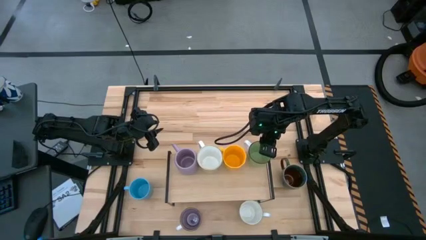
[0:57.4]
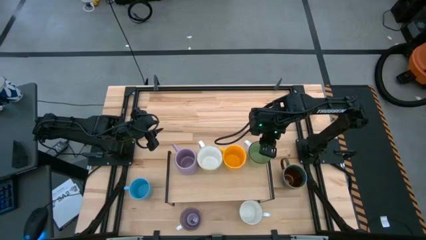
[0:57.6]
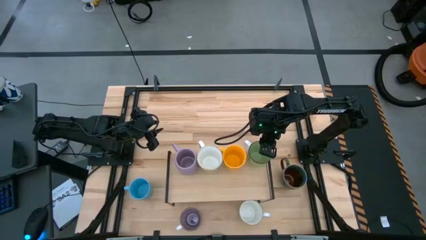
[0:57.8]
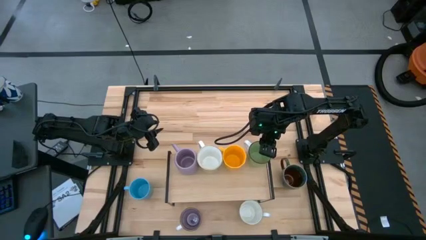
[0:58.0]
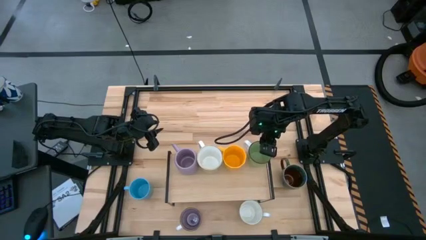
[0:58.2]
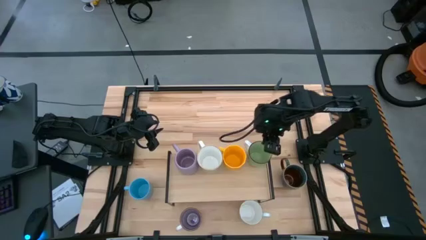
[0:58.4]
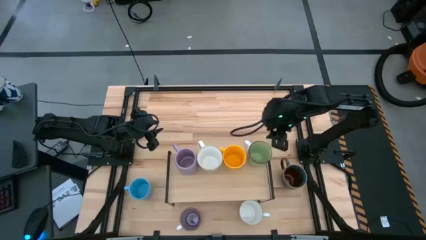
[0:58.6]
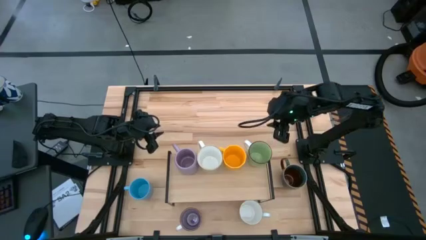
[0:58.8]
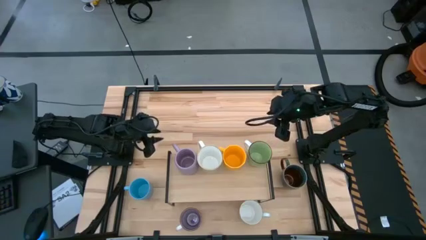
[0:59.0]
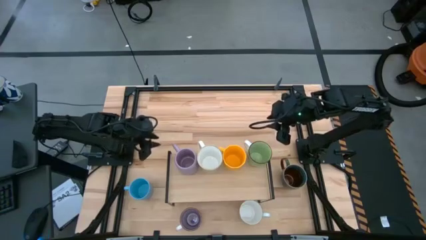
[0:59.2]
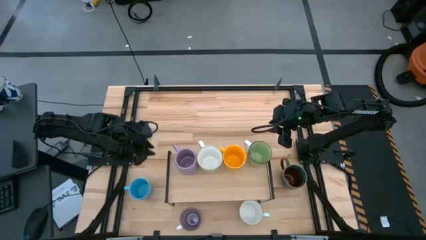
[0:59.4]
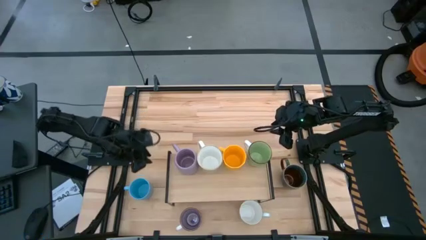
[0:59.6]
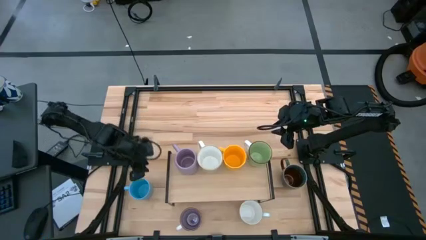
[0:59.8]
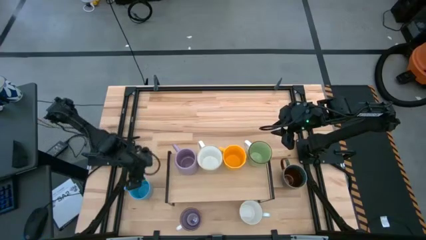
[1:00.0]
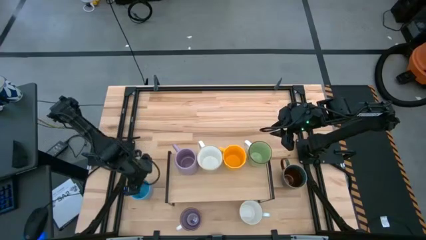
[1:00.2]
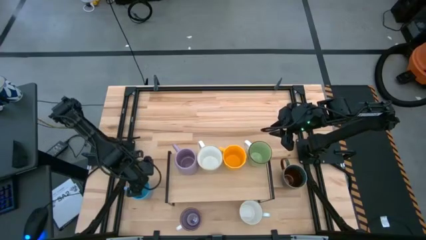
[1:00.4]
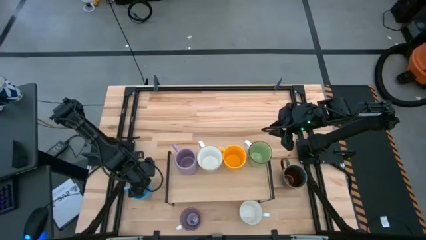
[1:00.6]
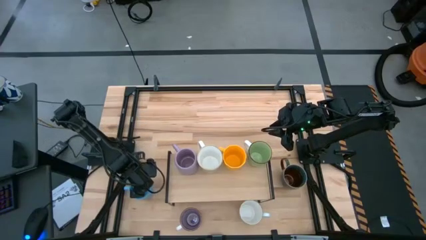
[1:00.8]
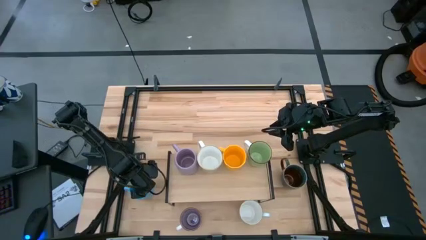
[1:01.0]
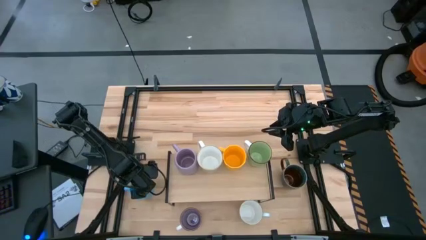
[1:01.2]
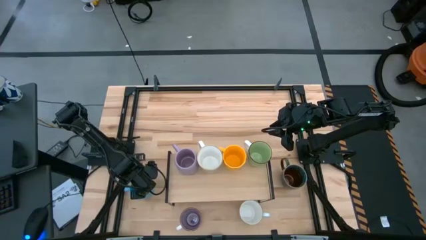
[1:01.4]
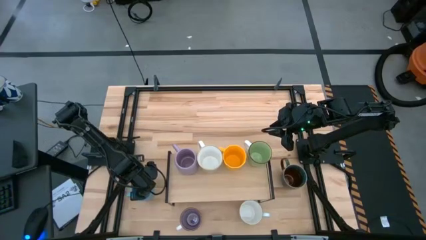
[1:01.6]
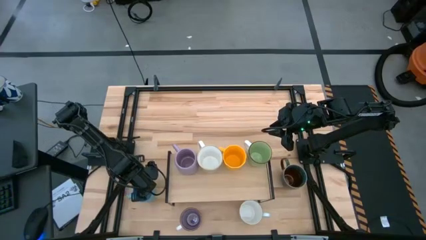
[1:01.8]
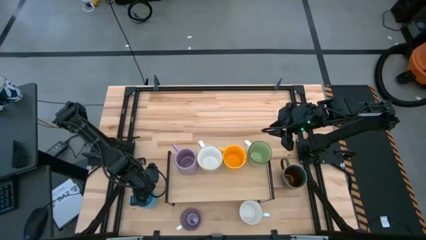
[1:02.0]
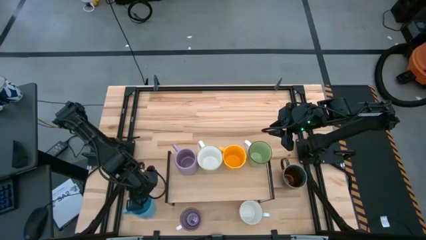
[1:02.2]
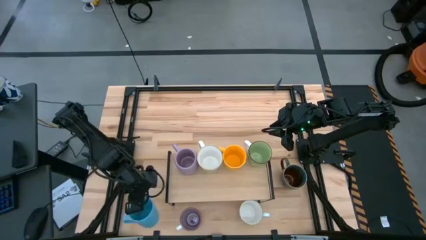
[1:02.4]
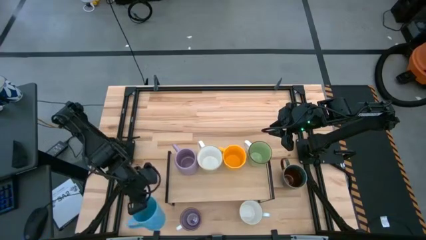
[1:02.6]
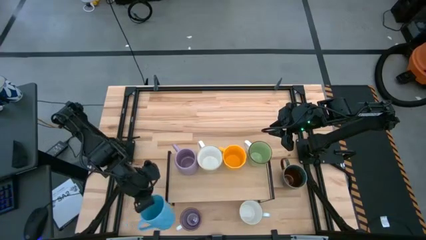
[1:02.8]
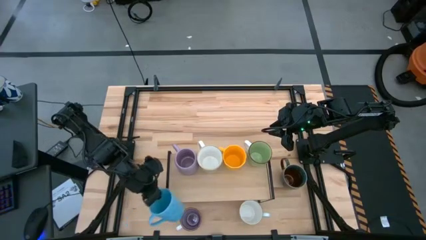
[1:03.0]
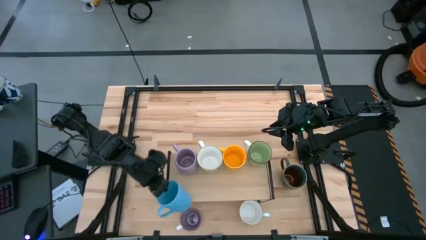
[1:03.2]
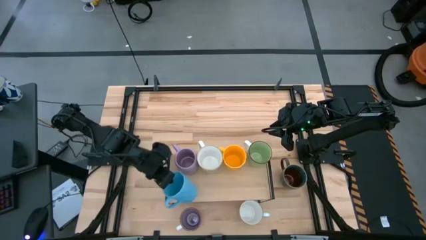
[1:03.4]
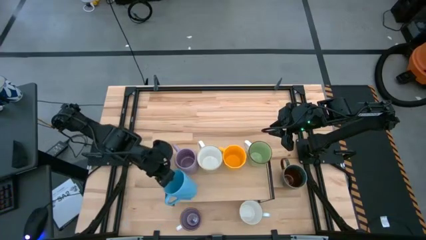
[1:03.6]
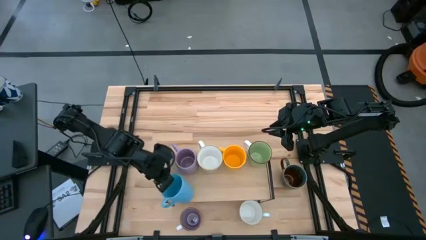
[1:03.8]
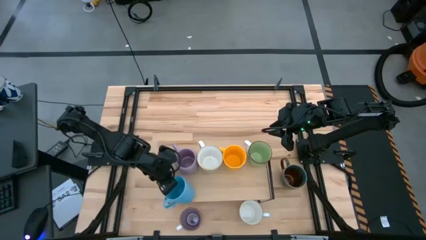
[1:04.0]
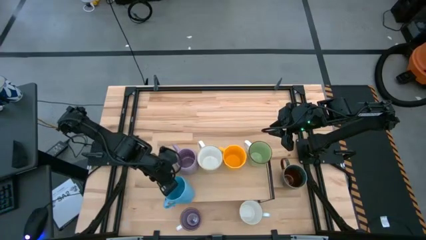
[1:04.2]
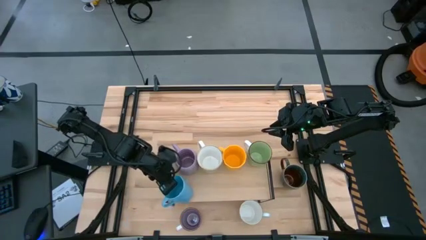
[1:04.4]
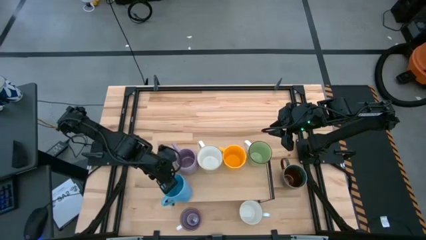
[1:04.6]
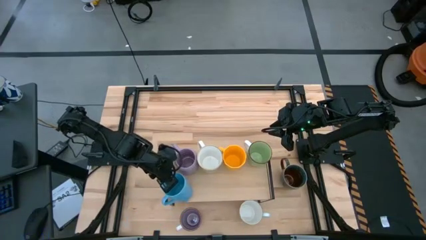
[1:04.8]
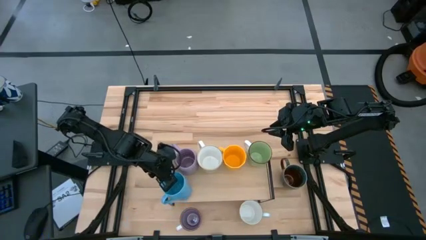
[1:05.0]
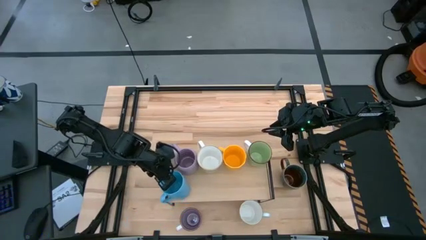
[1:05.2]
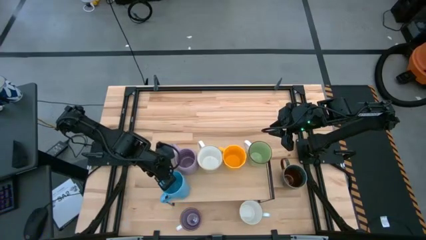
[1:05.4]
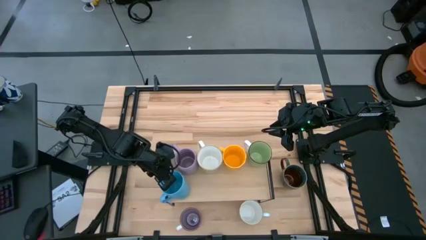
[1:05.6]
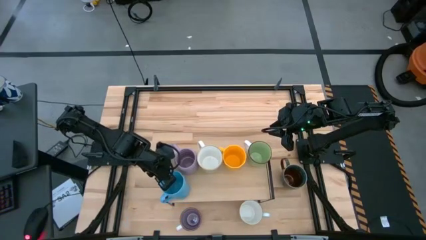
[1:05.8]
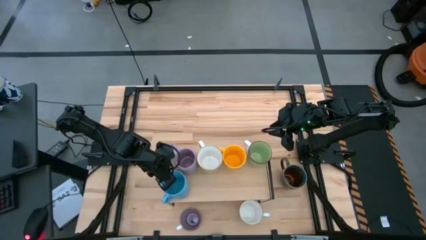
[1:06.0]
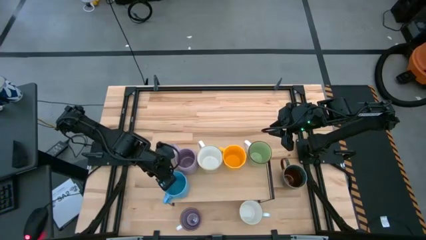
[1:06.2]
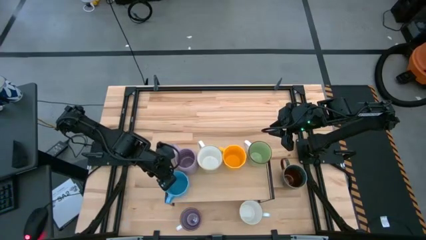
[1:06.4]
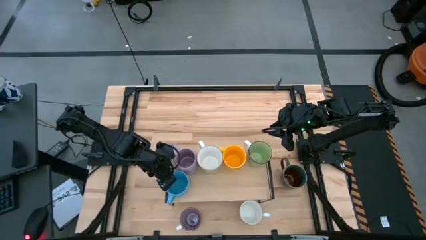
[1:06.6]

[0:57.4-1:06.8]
Task: Place coffee mugs
Put the blue mug on the shelf

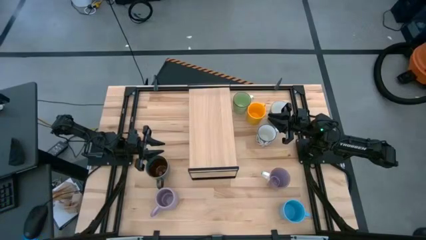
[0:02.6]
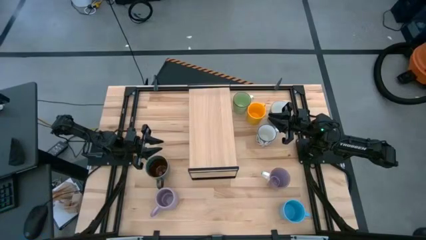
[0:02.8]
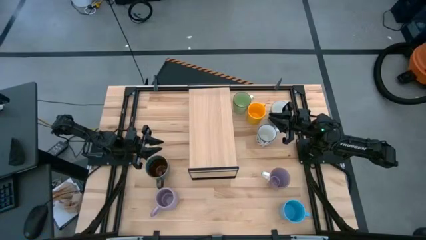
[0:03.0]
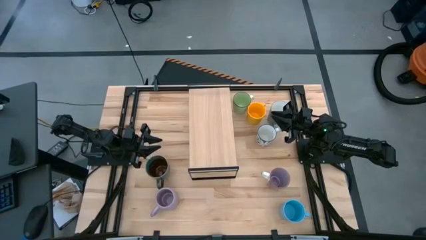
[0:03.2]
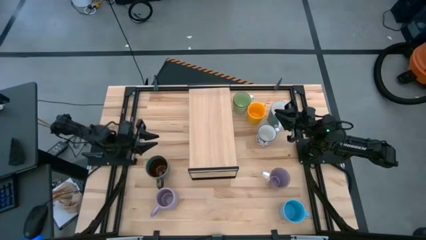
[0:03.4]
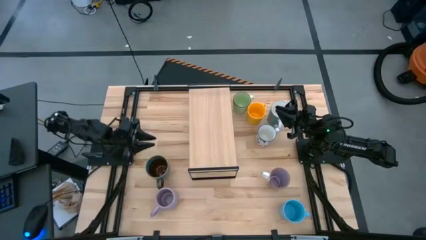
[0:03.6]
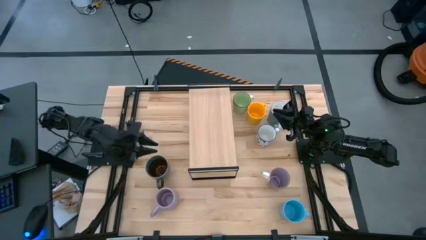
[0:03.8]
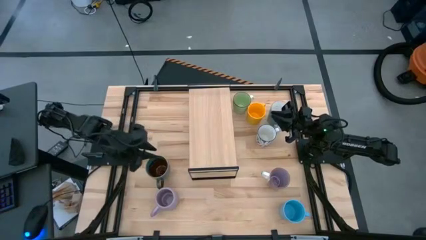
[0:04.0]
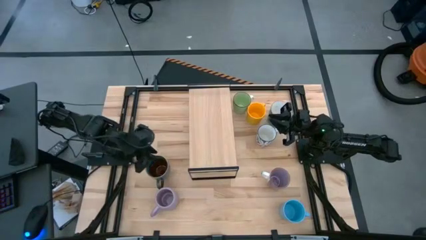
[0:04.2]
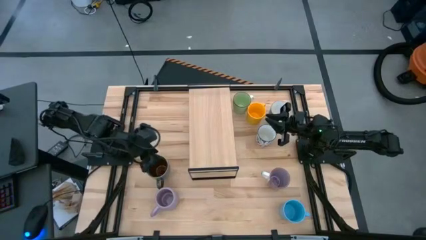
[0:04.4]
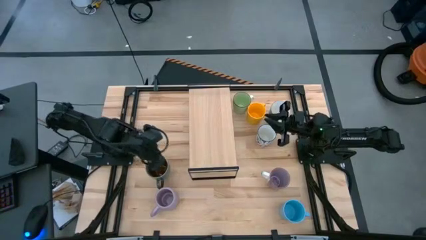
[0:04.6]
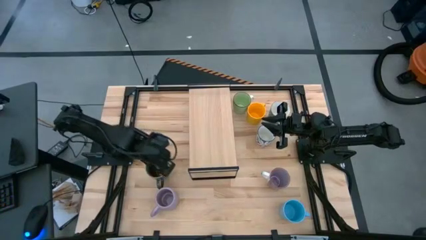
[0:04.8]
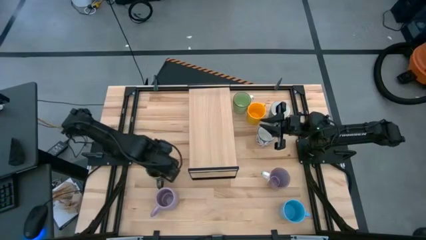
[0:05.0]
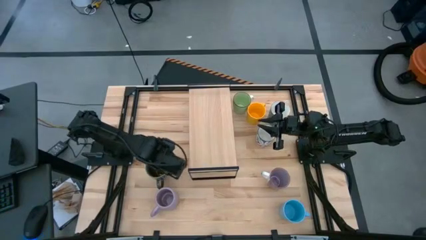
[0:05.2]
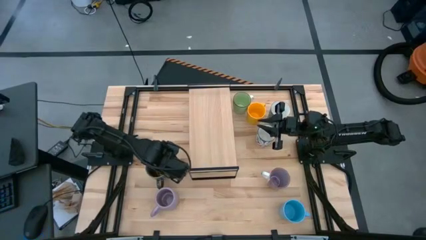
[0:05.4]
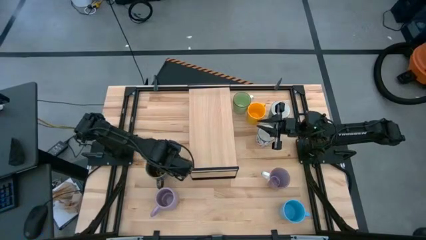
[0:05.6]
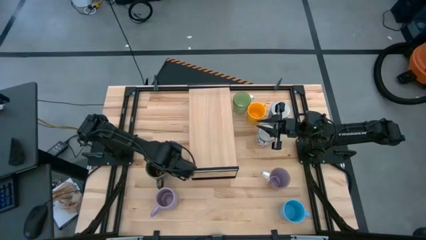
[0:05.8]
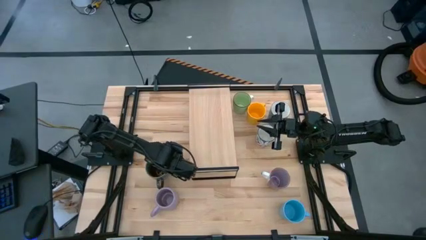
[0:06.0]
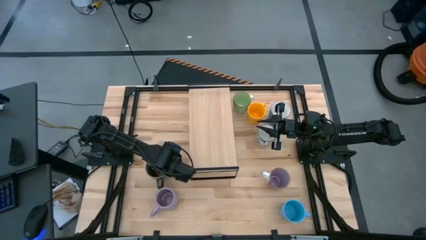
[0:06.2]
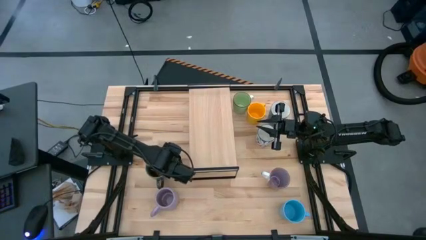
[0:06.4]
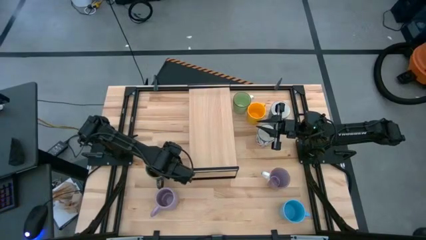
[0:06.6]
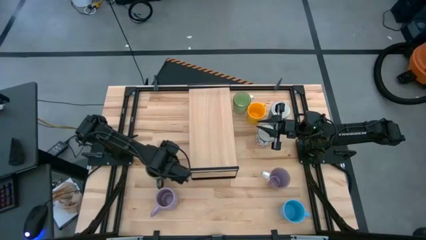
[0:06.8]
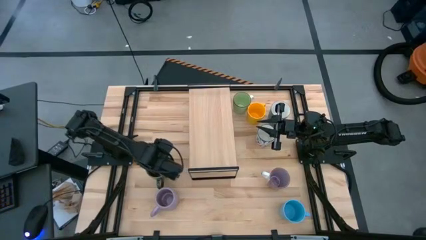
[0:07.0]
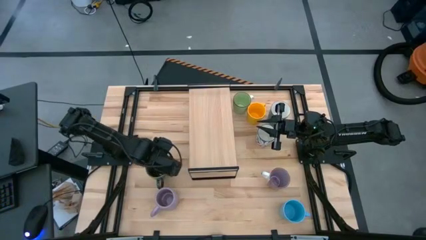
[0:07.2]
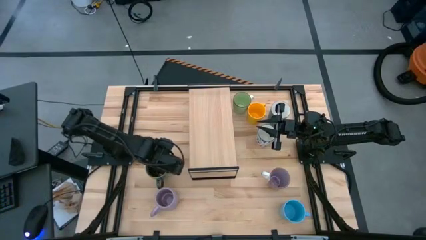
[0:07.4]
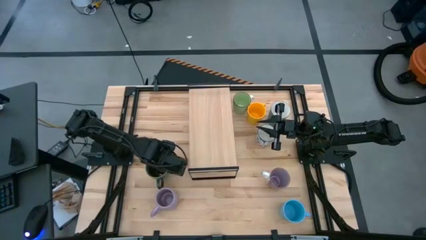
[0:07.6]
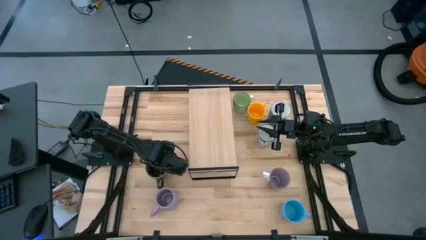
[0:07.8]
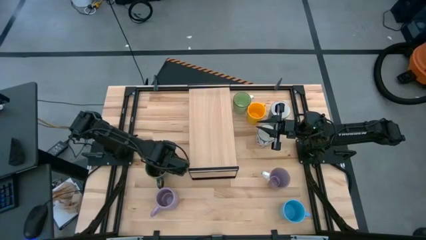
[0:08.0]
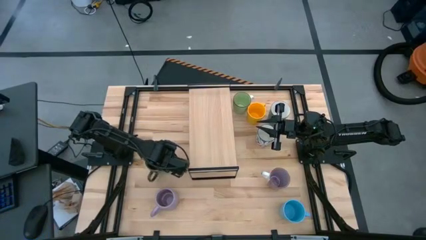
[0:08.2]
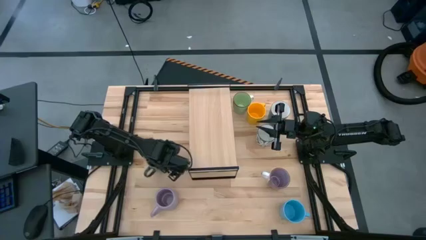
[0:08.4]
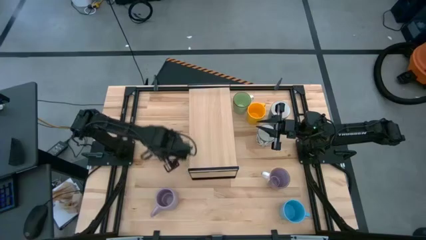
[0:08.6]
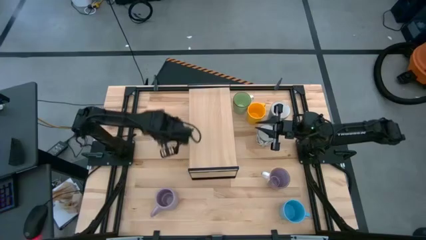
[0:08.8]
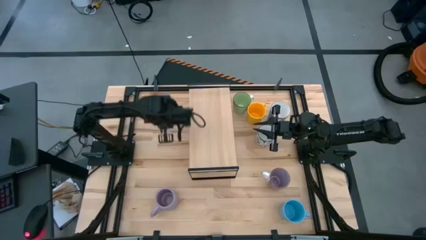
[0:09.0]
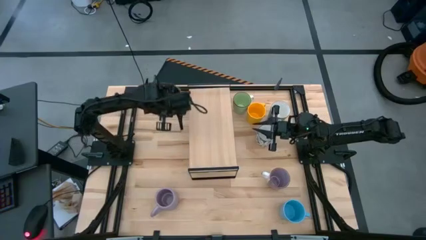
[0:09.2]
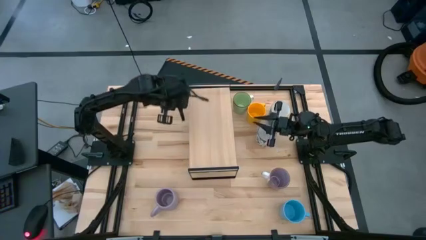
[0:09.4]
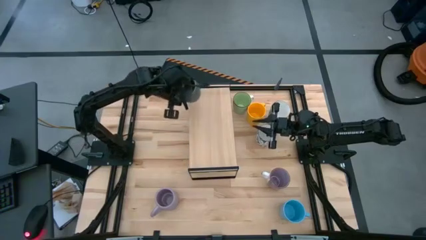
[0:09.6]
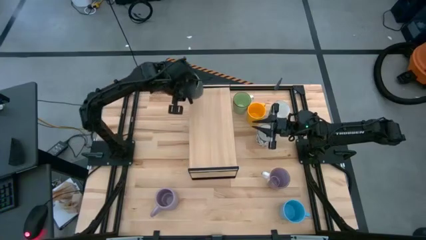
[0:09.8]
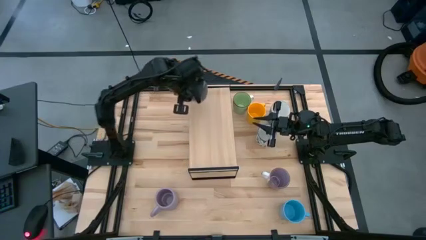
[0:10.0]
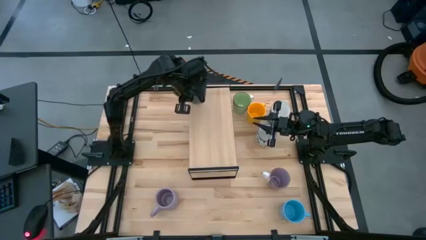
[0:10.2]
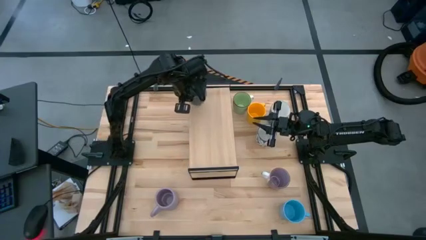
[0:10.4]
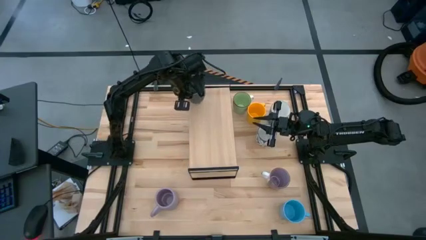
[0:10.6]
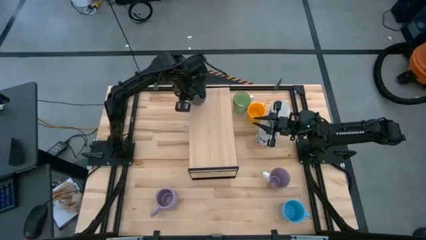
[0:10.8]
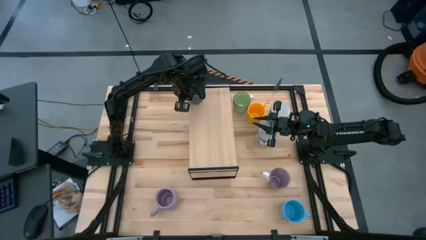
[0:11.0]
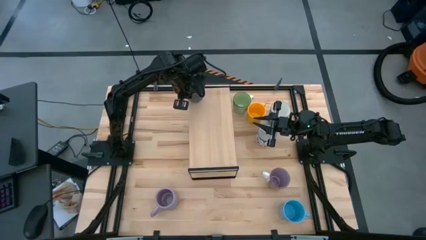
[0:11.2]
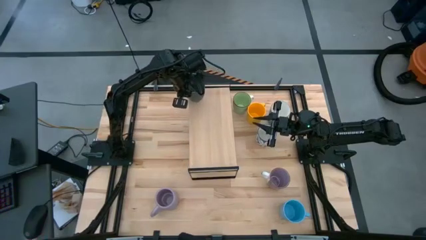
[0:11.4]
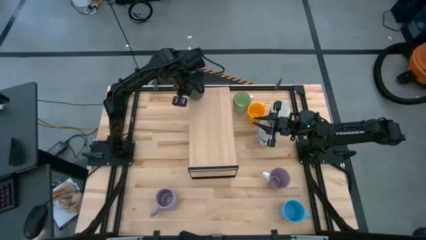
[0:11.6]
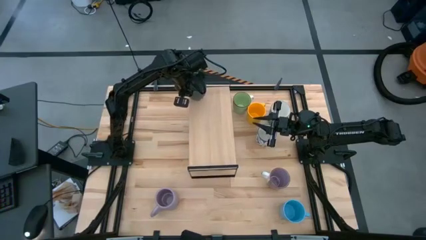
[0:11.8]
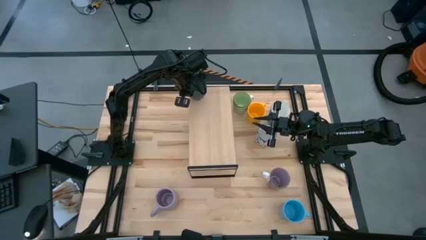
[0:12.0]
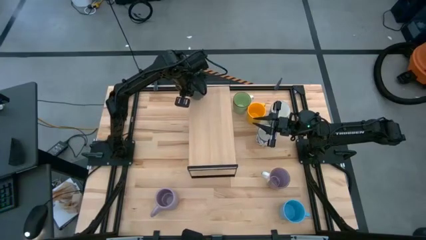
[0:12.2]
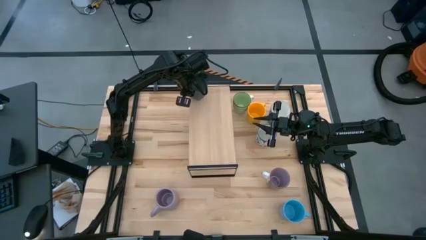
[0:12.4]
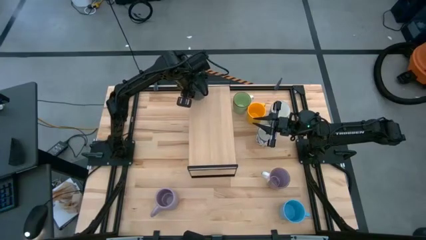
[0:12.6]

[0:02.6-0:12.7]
Task: Place coffee mugs
Put the dark blue mug on the shelf
